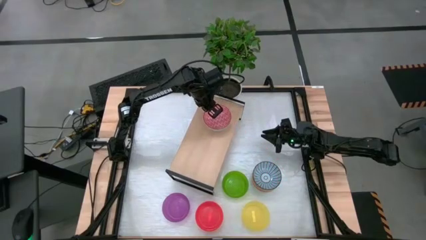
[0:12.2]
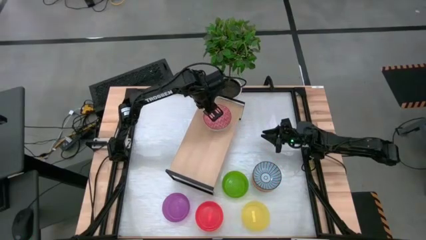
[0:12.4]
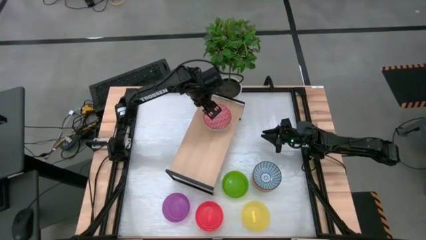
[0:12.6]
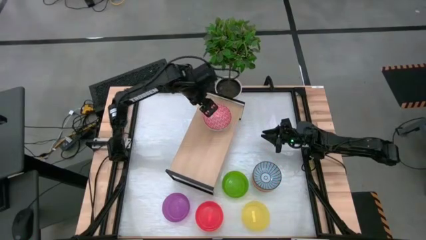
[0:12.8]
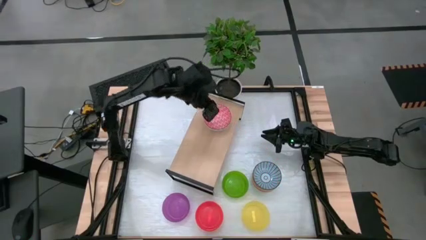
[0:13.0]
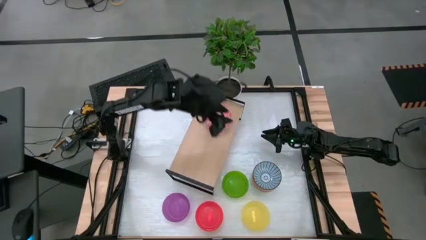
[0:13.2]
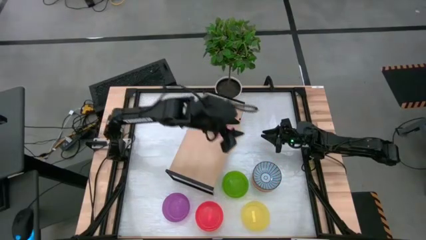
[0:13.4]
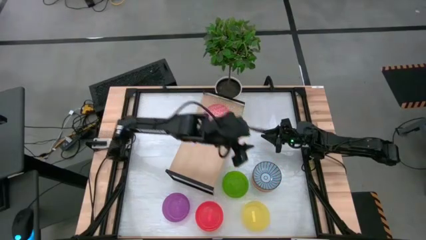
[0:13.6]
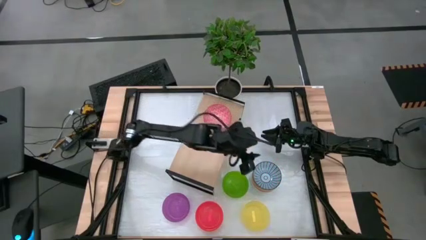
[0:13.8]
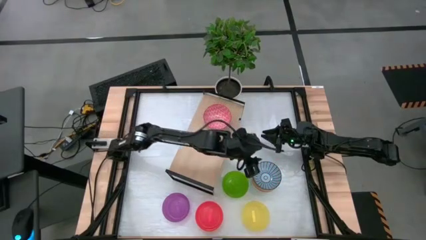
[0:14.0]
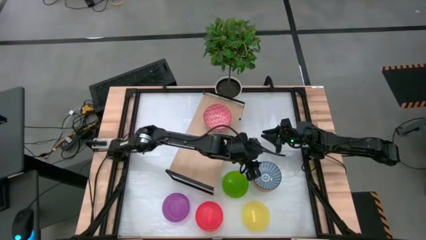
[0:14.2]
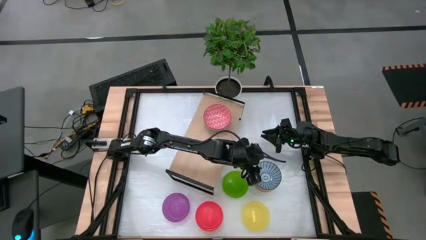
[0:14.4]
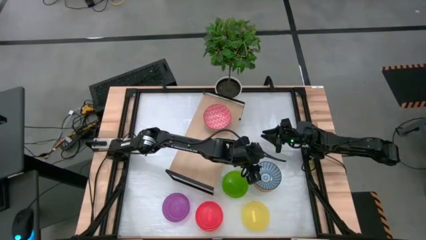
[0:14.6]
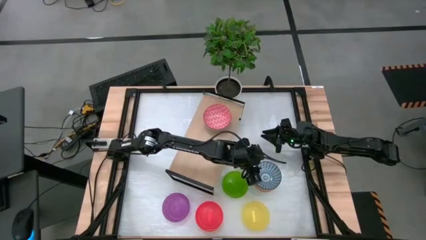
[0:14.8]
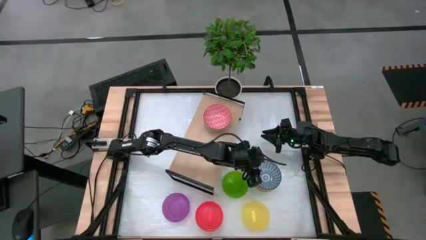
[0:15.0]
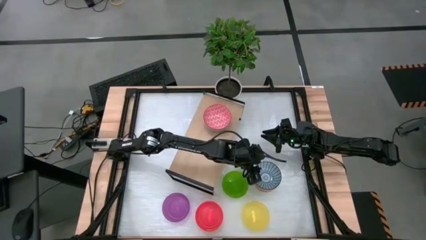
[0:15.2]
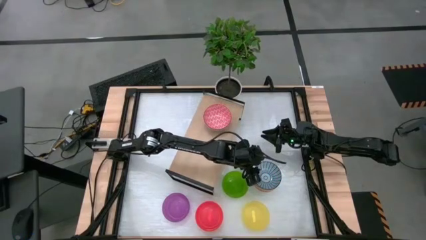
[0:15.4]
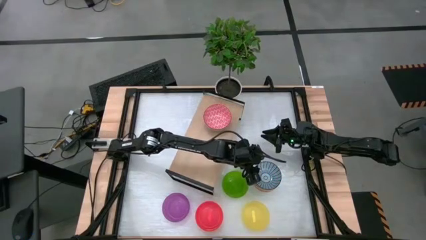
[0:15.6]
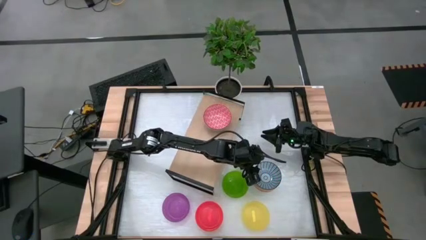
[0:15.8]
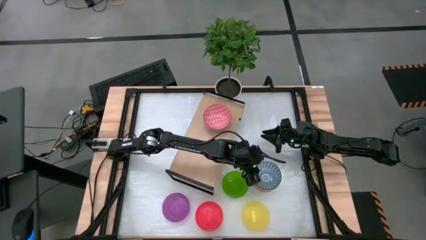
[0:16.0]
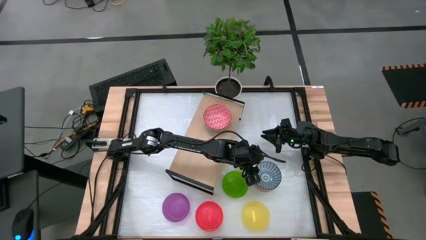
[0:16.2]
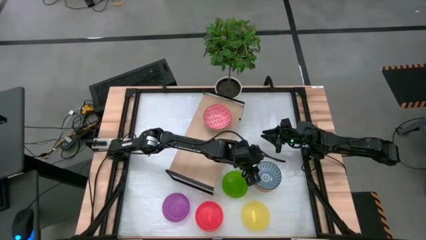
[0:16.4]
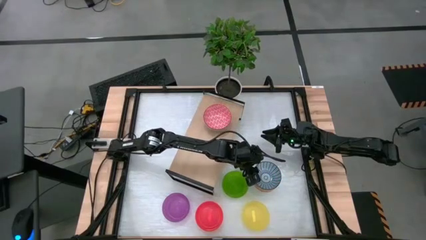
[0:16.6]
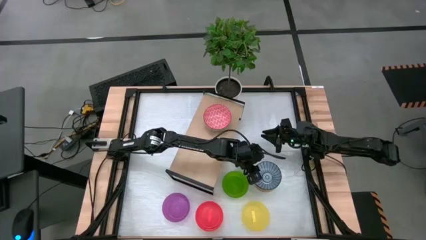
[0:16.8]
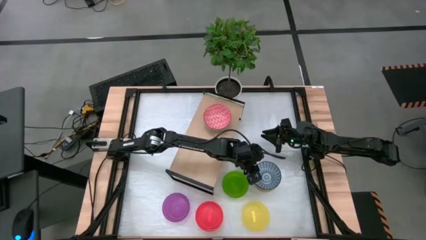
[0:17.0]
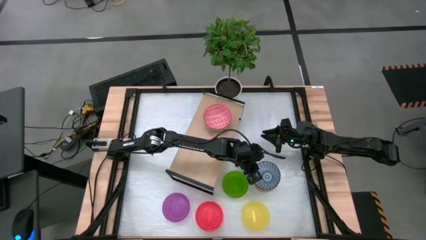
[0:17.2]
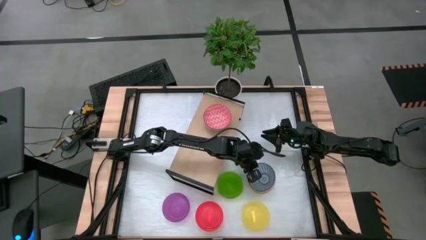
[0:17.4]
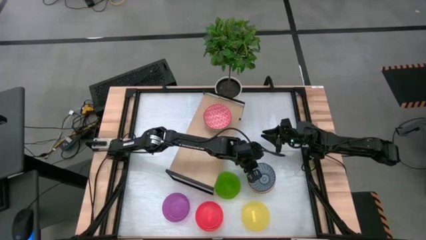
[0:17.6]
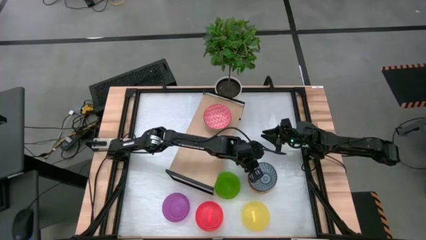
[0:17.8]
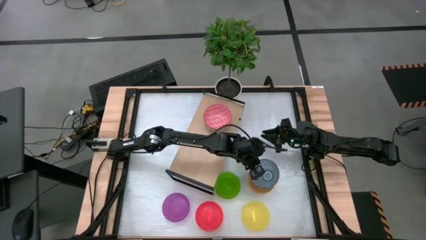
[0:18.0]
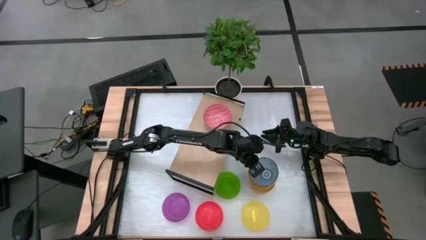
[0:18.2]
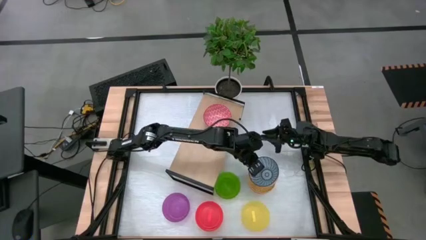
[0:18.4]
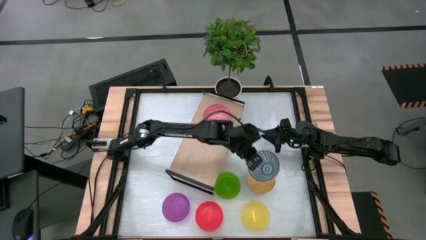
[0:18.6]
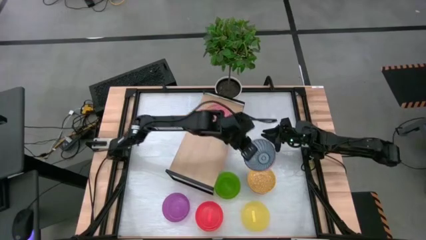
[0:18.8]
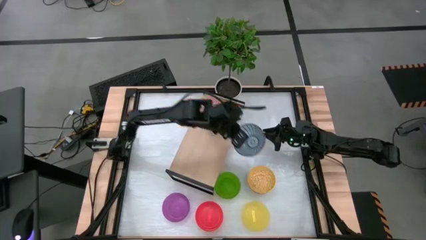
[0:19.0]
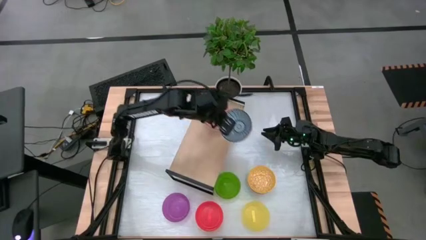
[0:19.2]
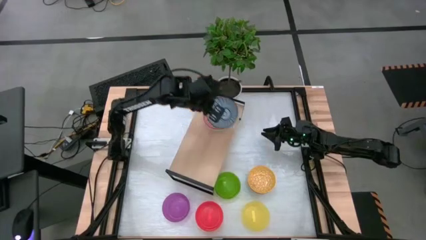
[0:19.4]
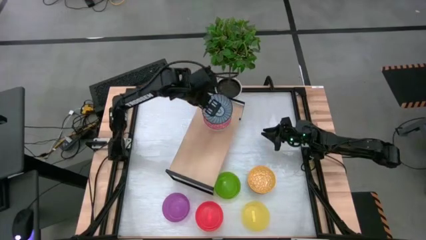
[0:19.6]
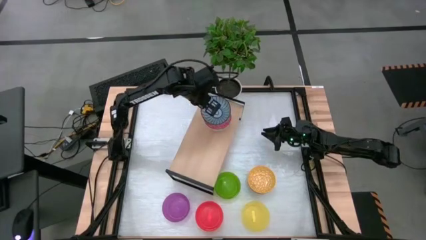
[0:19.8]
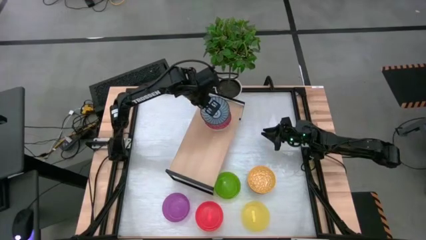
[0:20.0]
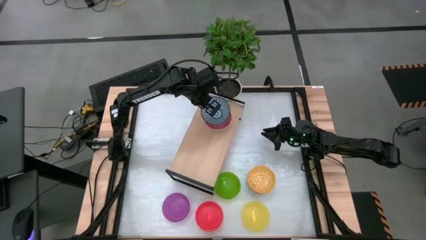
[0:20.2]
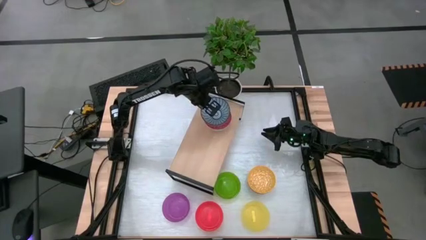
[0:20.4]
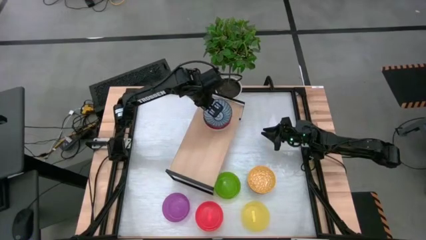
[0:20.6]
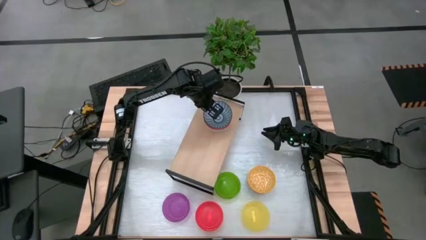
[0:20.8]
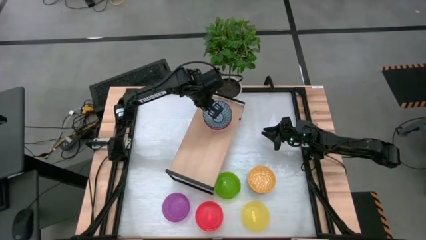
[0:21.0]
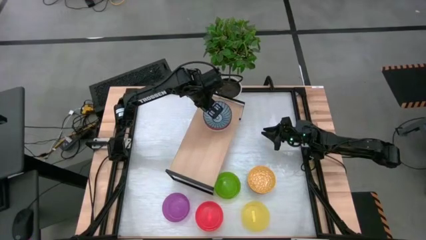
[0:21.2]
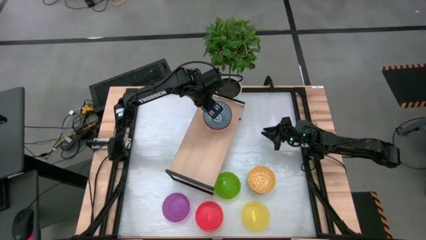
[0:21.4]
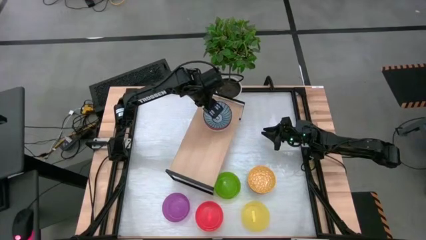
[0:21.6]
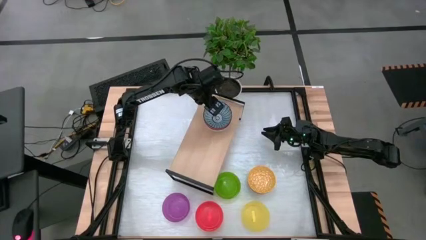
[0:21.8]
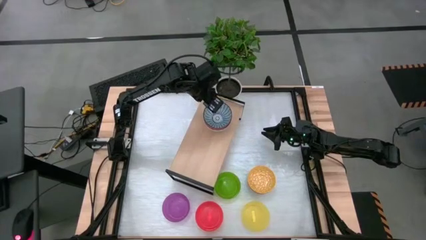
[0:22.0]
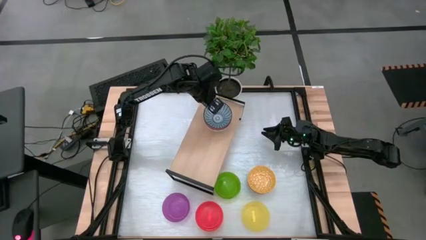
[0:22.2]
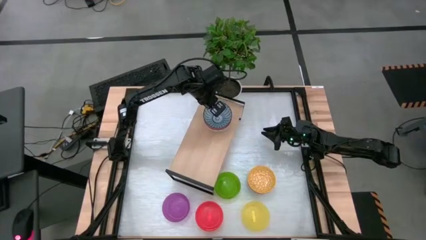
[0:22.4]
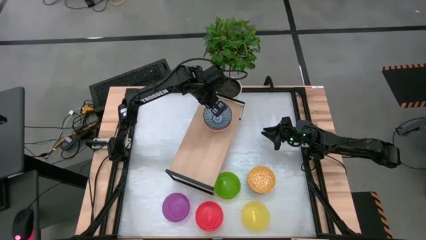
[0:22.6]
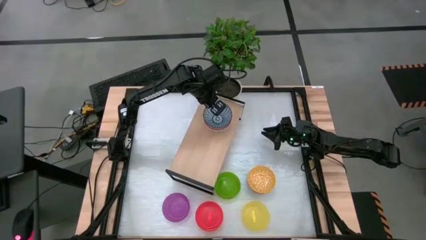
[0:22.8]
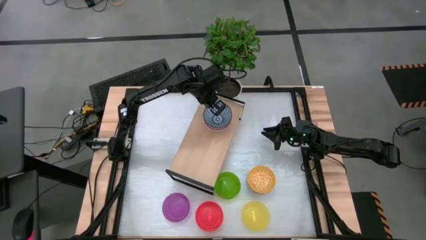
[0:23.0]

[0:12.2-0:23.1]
Task: Place and stack bowls onto a shelf
Stack the blue patterned bowl on top of the red patterned bowl on the shelf

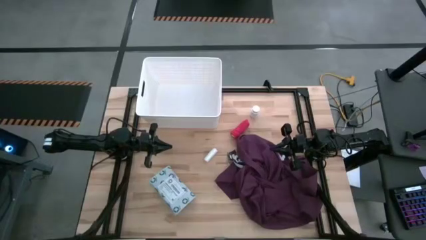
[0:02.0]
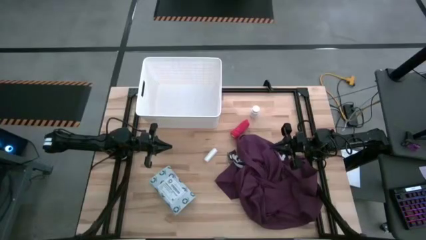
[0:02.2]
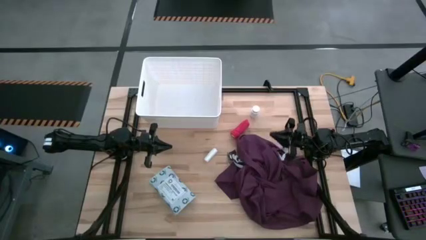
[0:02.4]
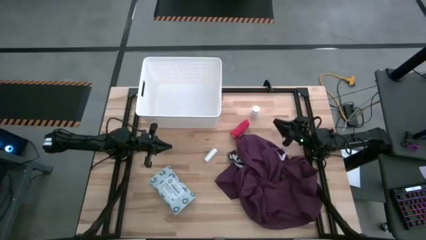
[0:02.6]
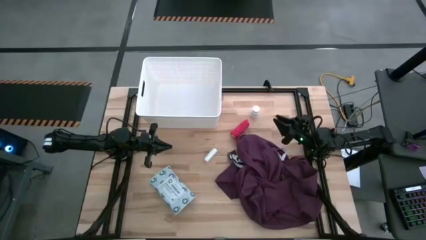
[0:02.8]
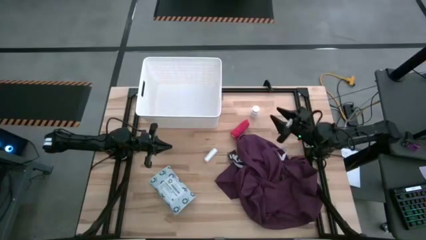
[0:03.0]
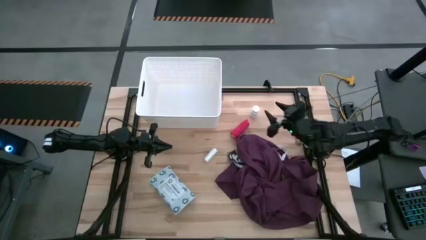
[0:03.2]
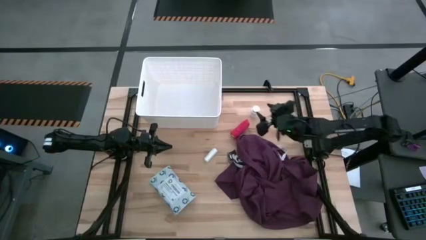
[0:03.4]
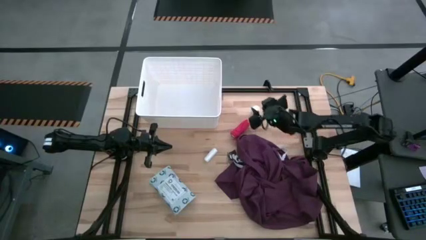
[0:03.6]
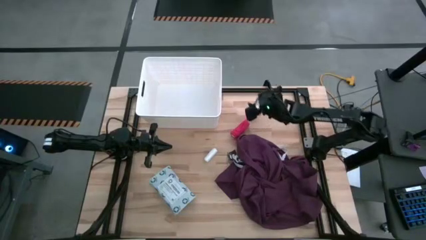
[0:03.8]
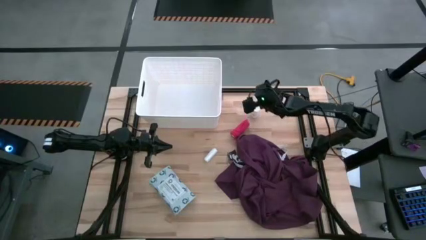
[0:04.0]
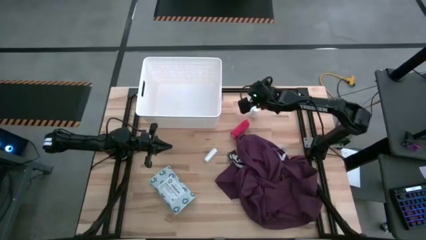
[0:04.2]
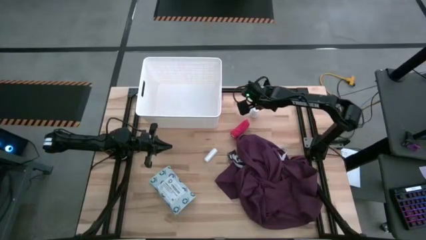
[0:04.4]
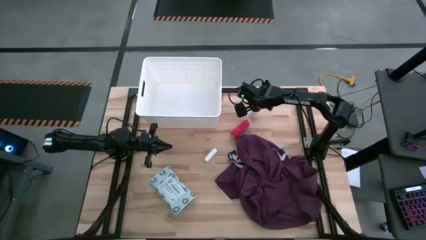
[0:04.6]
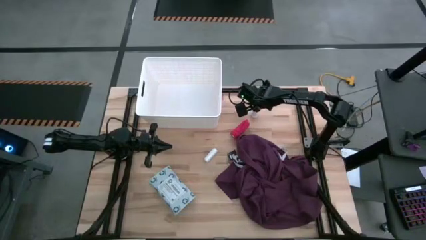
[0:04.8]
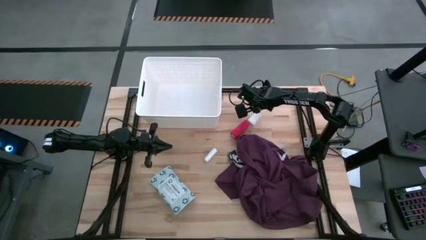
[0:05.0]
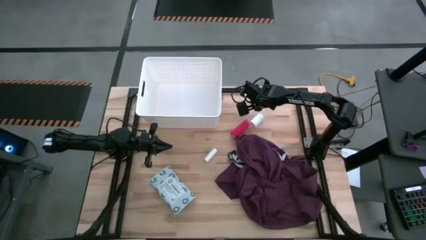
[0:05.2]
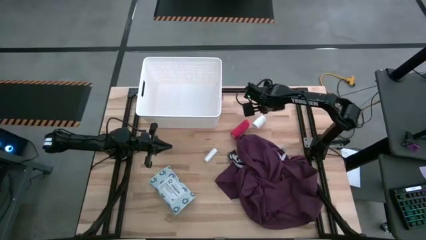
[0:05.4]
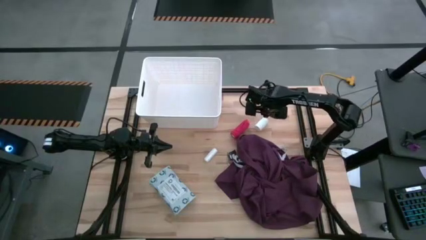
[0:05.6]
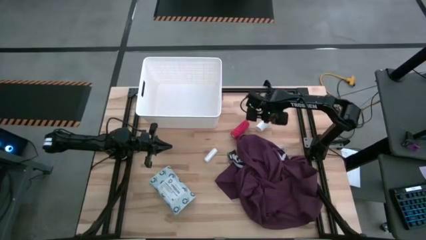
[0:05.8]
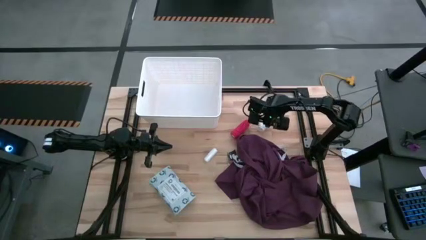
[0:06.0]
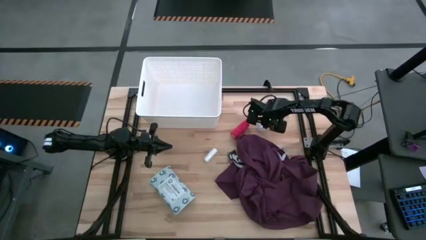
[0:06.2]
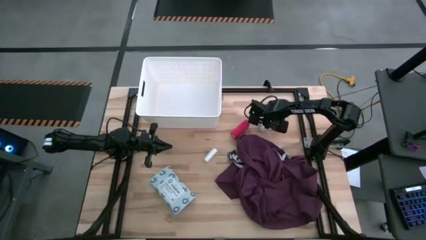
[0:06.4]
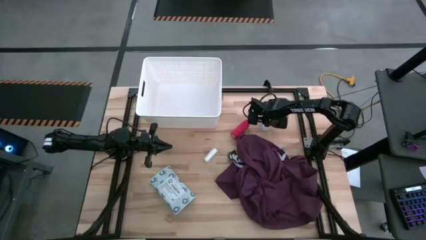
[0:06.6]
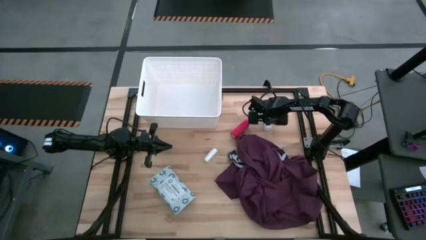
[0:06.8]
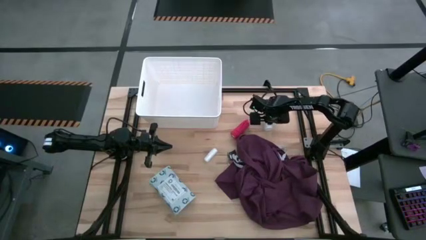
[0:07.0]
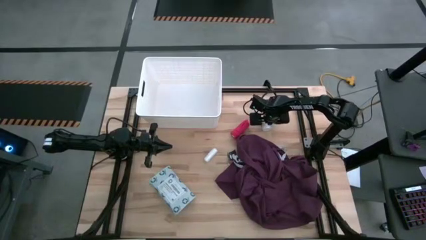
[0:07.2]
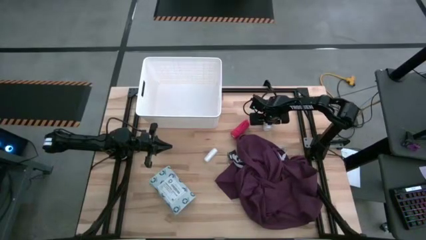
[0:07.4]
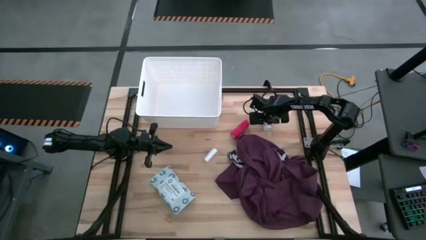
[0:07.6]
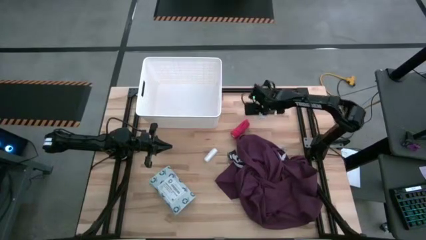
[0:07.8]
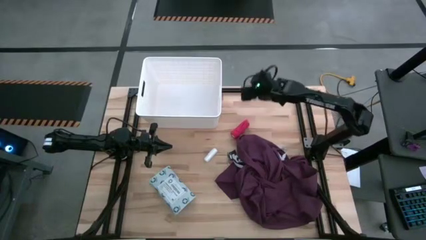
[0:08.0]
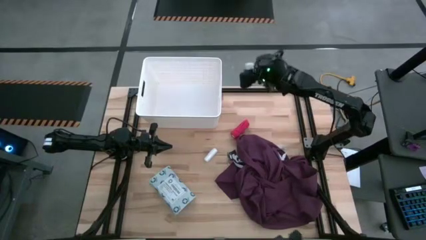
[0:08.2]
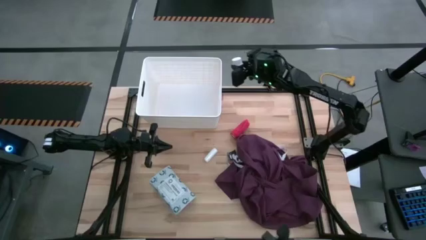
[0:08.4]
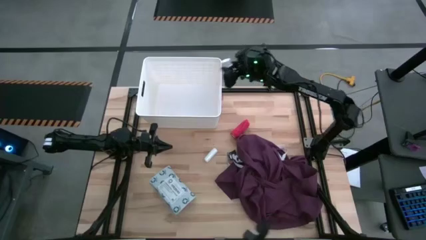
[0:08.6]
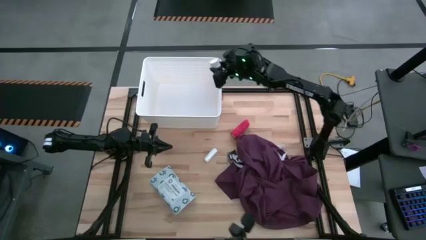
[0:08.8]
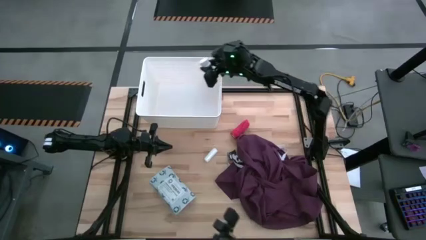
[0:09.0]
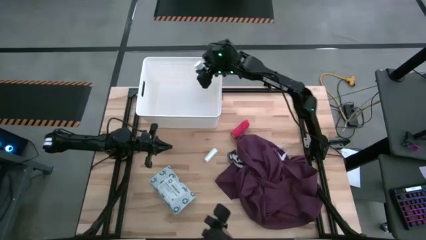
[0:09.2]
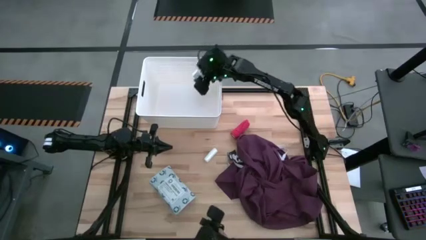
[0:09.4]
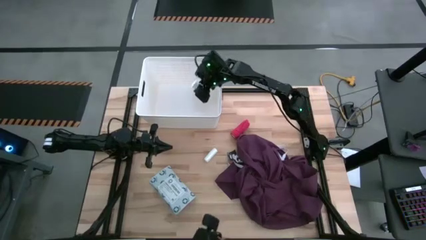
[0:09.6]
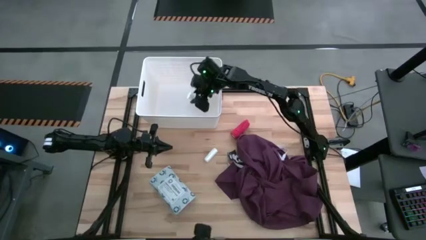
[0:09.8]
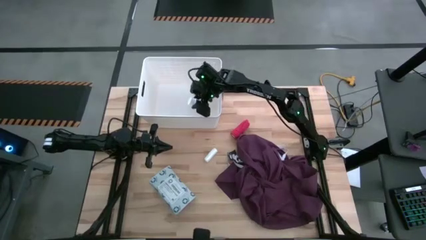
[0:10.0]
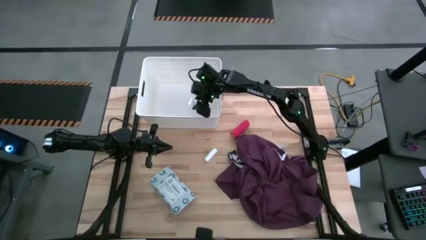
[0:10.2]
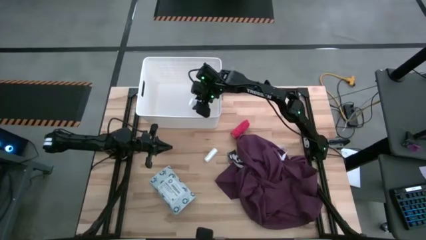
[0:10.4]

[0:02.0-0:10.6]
Task: Pick & place medical supplies in basket/bin
Put the white medicine bottle into the white bin
